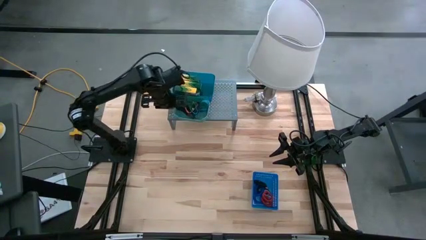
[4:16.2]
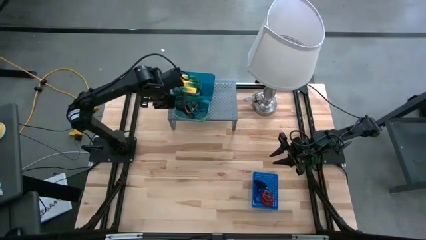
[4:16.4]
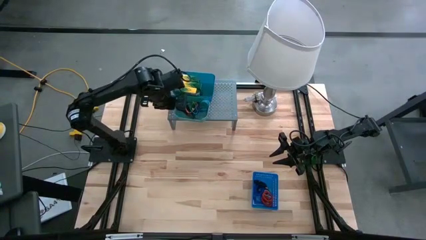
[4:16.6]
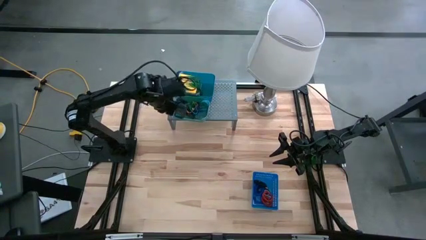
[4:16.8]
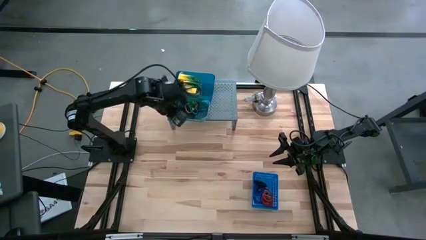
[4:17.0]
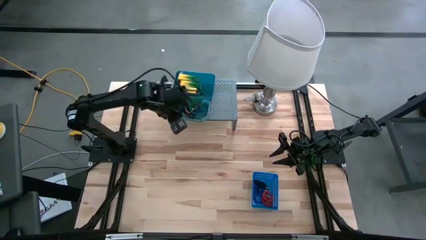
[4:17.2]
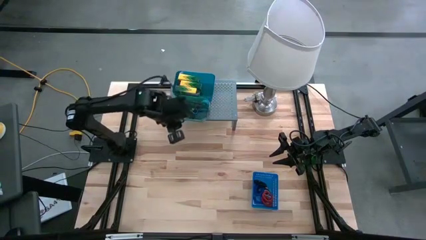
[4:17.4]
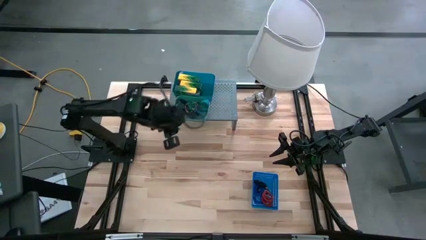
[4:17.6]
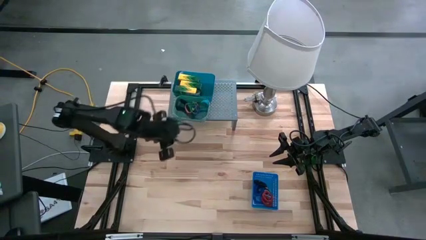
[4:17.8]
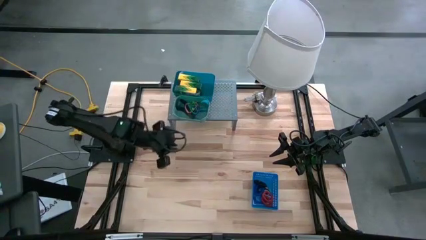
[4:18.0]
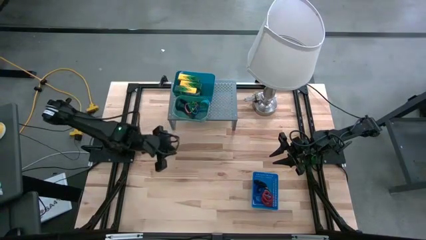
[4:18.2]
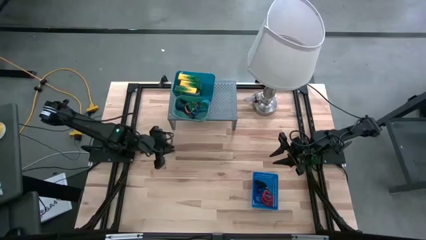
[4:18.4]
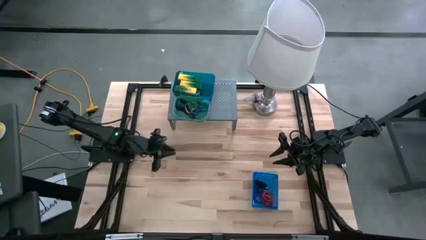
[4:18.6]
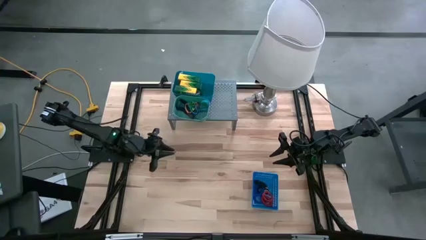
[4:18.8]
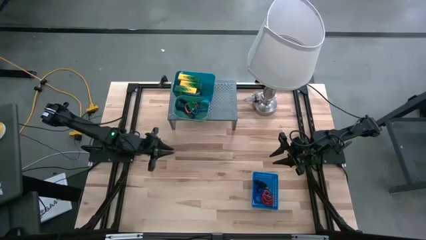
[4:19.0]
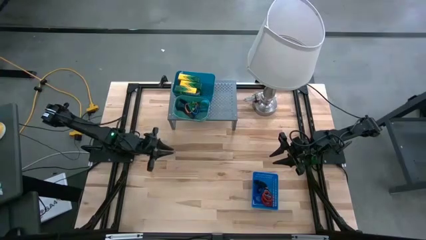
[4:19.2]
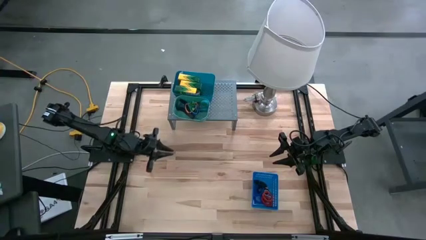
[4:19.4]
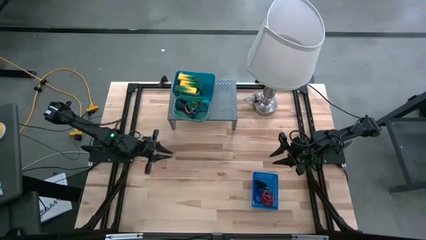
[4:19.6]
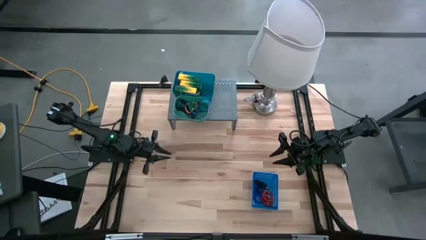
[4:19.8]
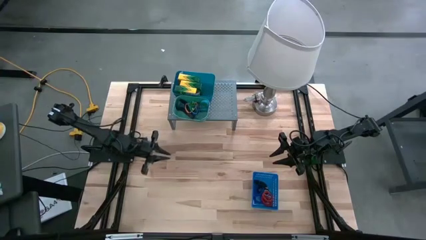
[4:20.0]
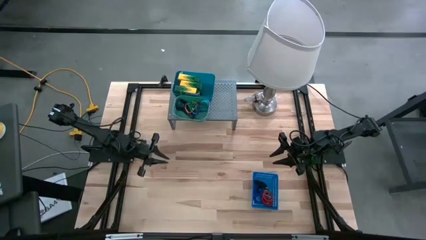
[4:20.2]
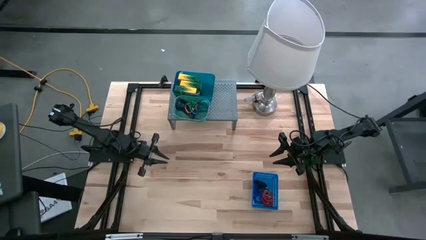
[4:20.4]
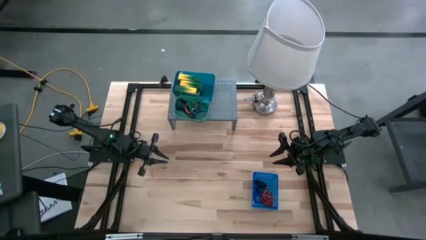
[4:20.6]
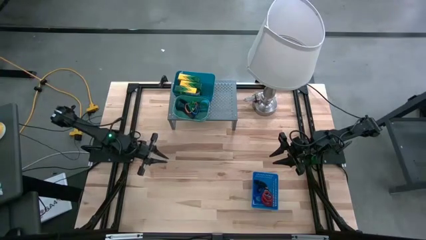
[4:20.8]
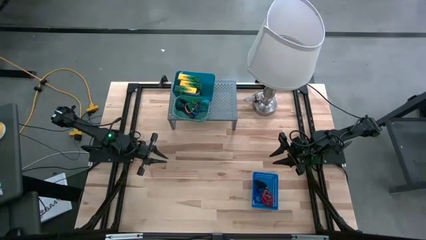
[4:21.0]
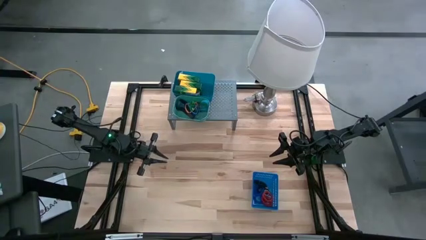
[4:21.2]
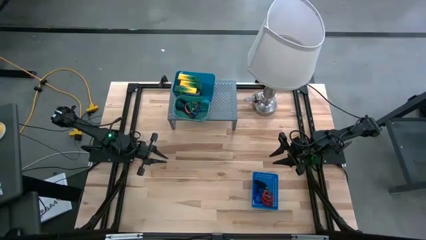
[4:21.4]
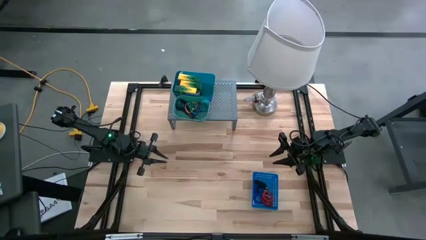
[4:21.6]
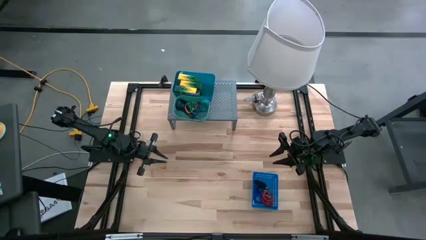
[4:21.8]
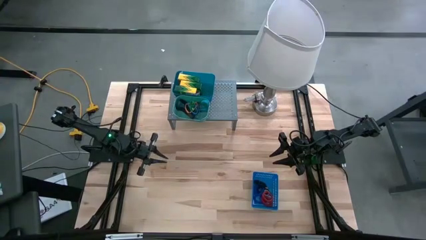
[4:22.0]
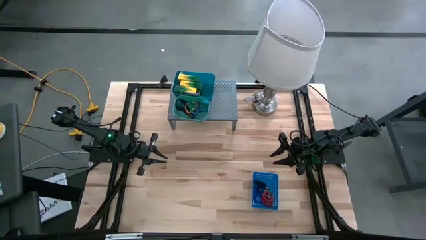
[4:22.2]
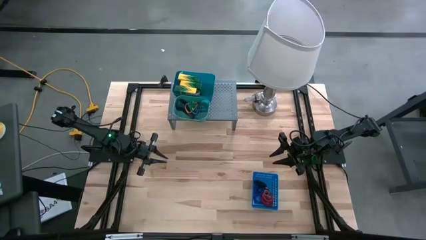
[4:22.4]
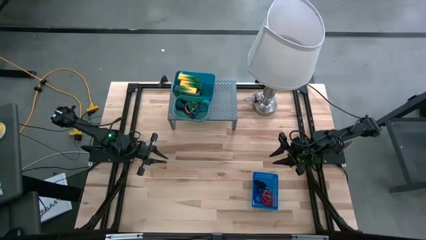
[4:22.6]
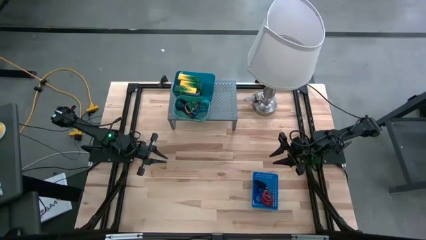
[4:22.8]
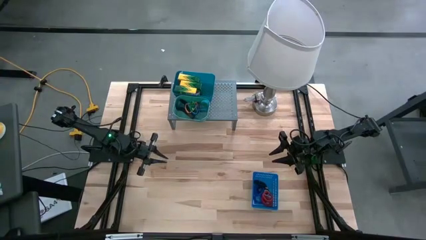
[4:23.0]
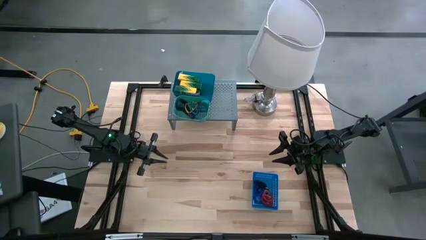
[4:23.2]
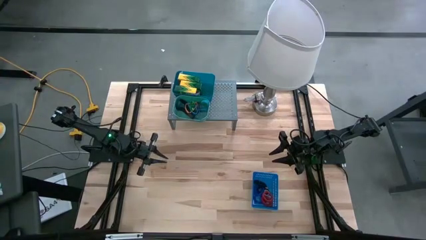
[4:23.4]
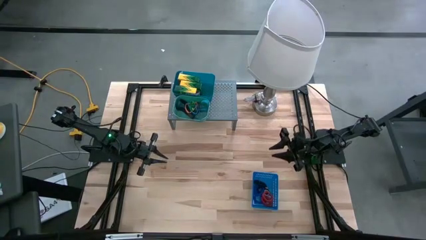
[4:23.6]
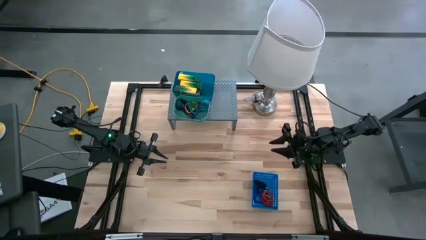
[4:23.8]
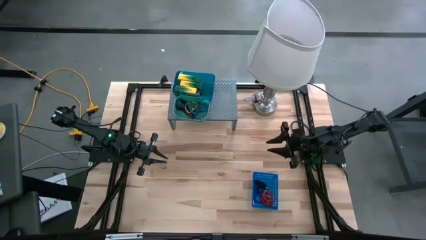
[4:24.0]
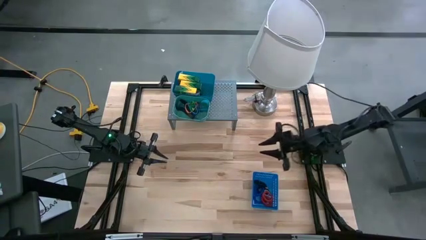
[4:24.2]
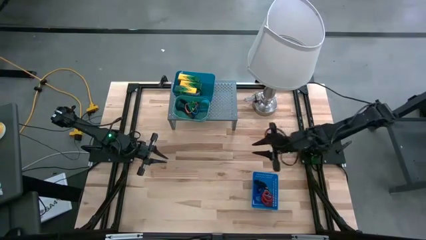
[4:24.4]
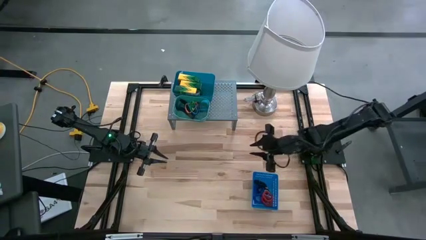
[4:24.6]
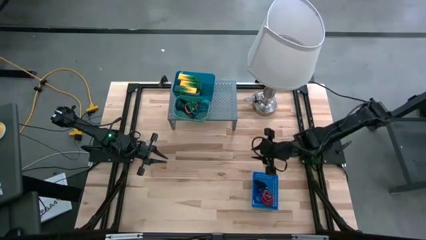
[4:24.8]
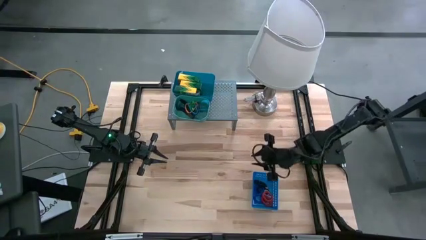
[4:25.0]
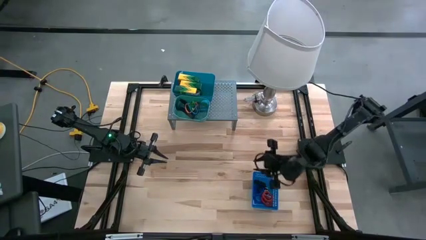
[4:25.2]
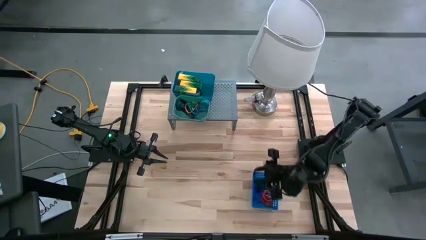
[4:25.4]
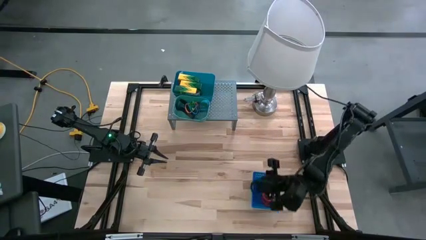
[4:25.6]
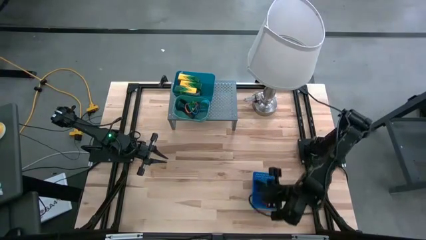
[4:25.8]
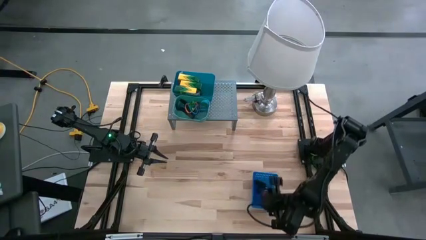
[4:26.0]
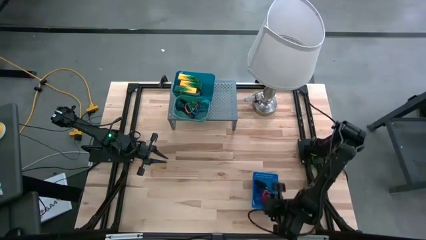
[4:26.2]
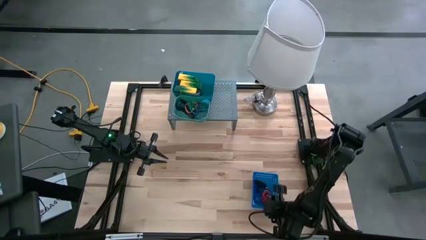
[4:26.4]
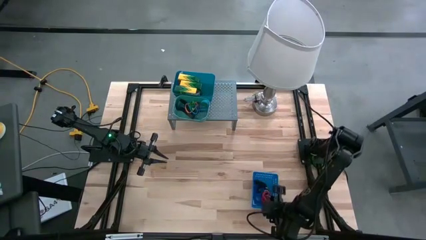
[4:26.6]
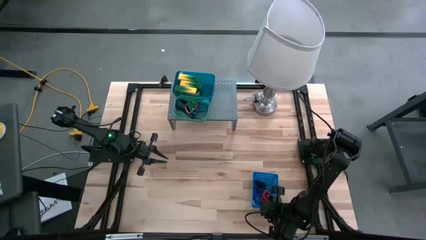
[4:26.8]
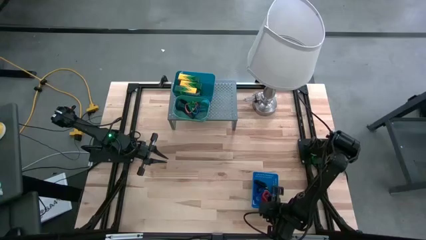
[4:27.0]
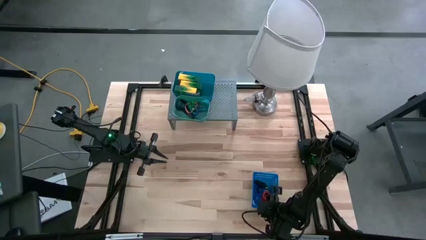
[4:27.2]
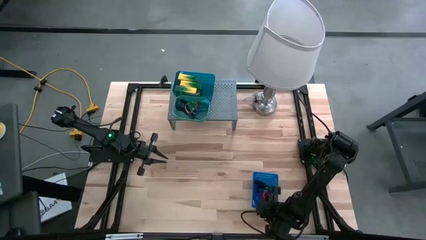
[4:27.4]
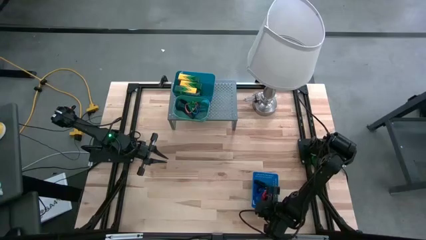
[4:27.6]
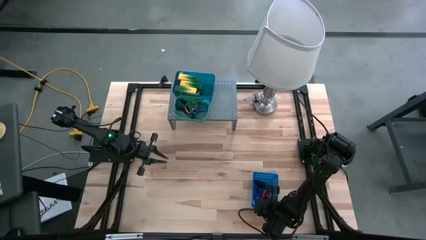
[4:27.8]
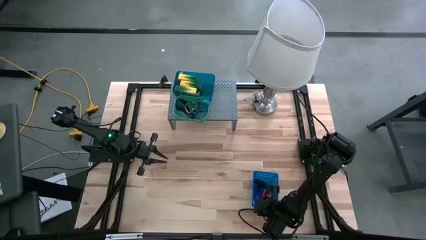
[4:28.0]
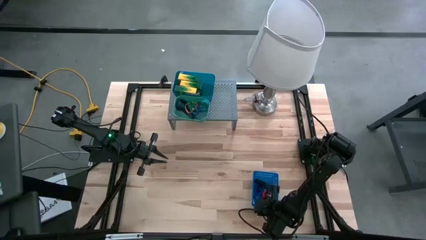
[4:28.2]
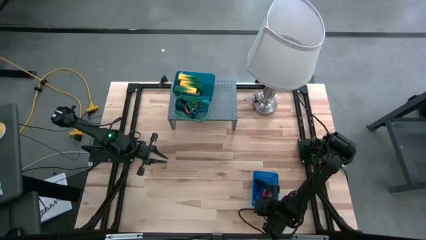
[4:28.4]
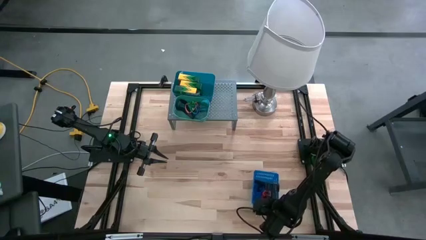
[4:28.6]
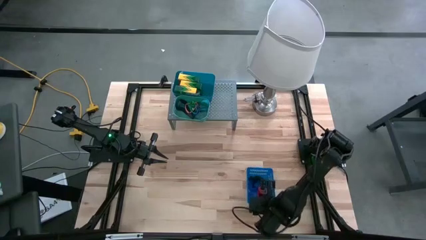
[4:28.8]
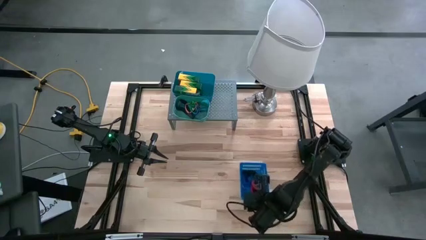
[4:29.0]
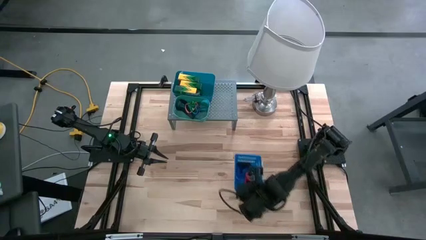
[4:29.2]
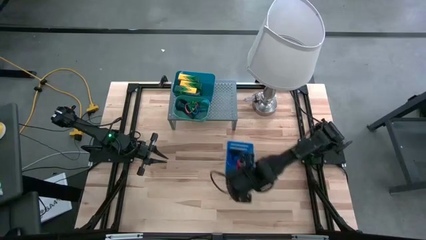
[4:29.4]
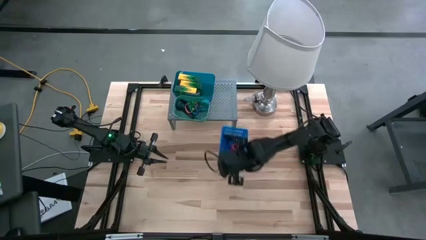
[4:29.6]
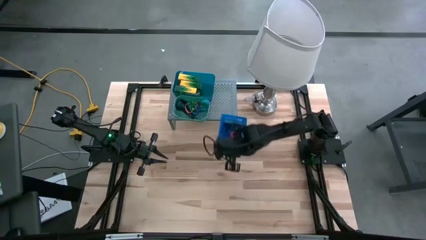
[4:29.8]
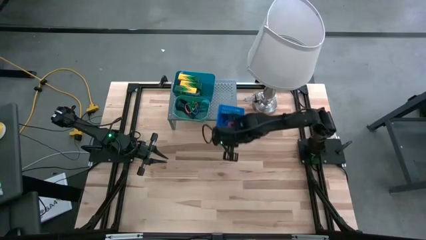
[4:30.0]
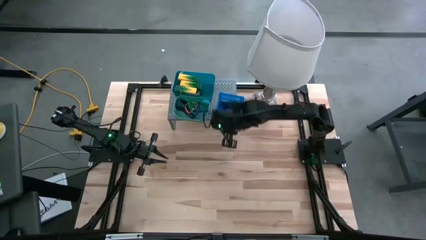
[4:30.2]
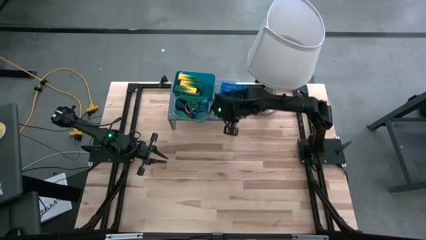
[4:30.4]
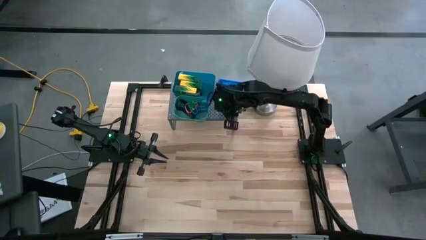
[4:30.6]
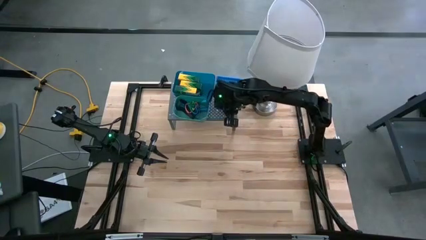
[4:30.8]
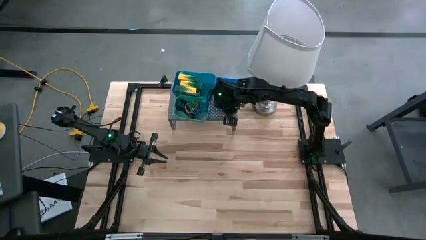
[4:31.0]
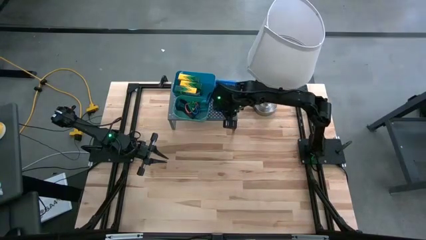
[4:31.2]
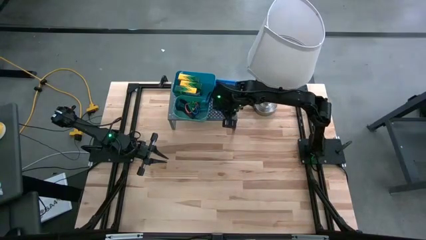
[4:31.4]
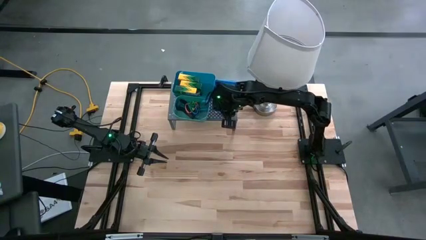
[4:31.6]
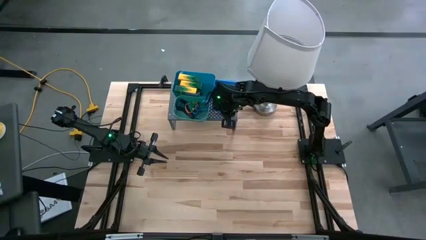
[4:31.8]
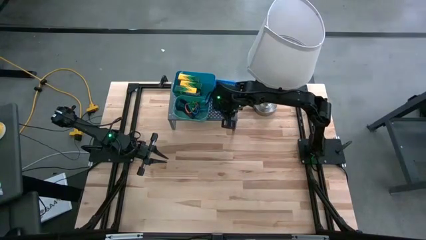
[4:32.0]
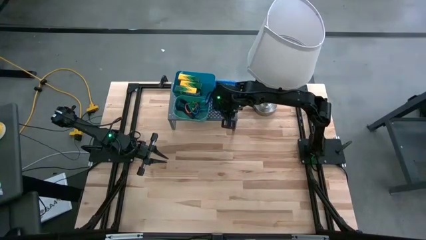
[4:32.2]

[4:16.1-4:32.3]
Task: Pick & Place Office Desk Supplies
Put the blue bin with spring keychains on the shelf
